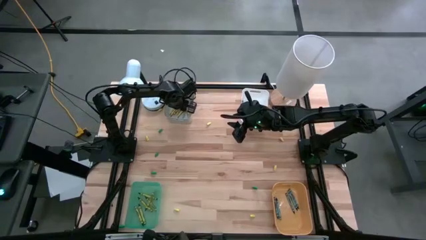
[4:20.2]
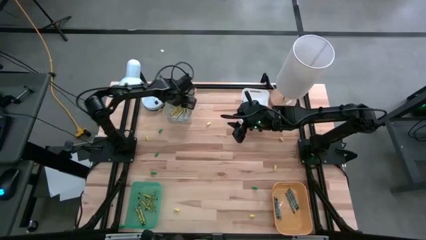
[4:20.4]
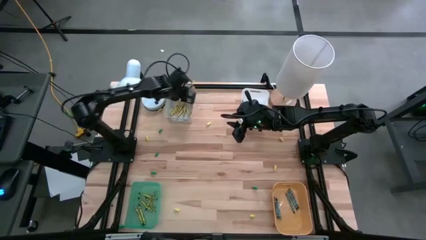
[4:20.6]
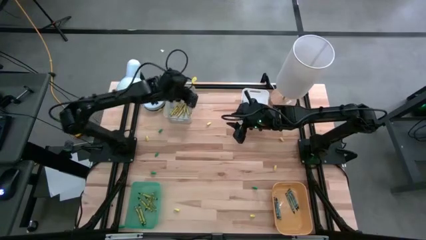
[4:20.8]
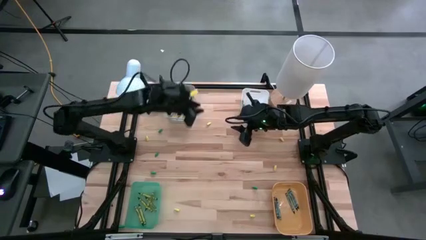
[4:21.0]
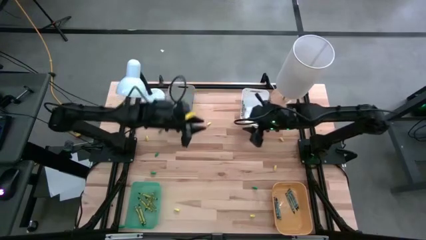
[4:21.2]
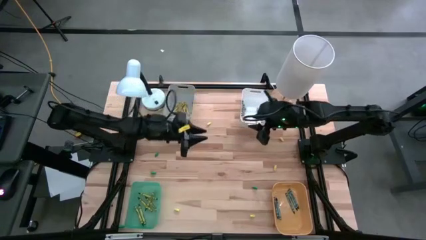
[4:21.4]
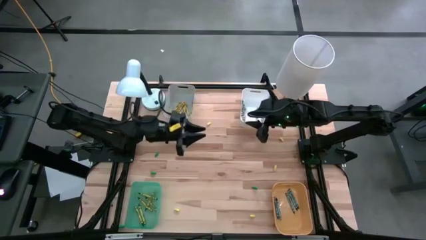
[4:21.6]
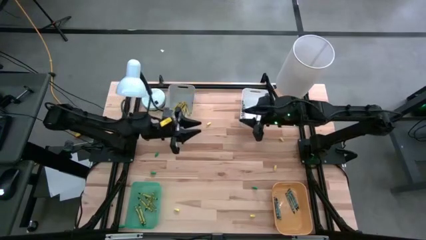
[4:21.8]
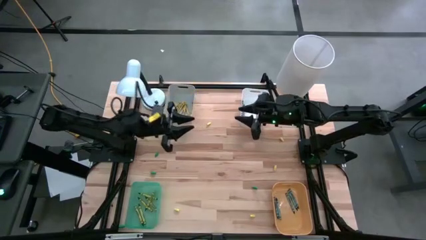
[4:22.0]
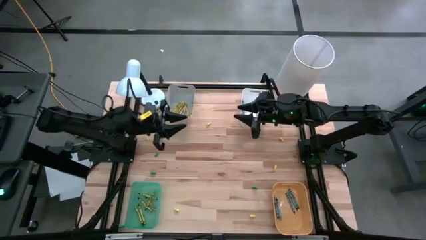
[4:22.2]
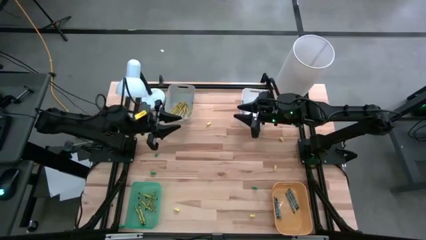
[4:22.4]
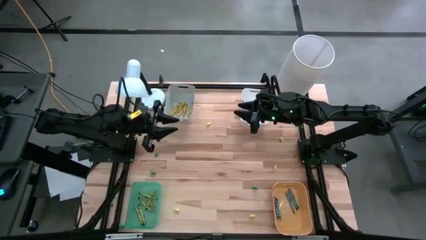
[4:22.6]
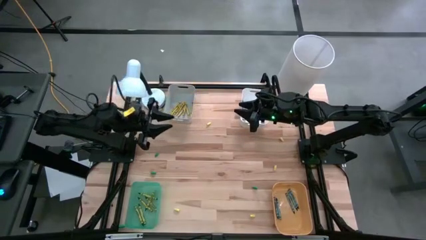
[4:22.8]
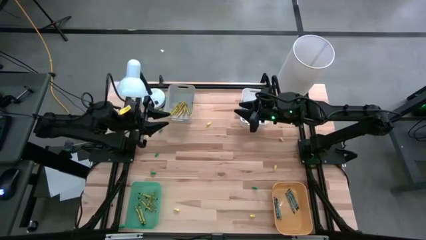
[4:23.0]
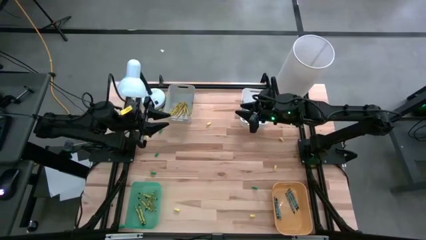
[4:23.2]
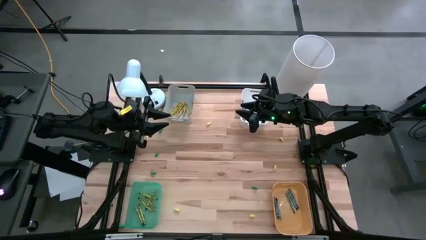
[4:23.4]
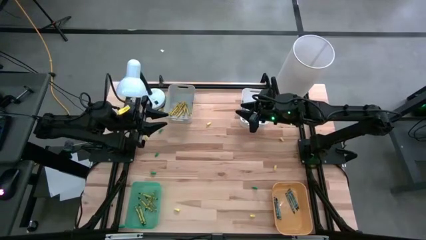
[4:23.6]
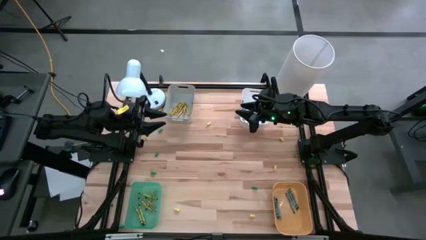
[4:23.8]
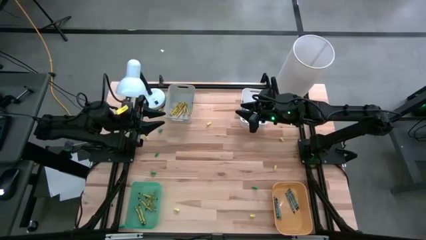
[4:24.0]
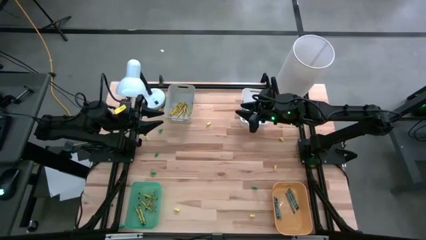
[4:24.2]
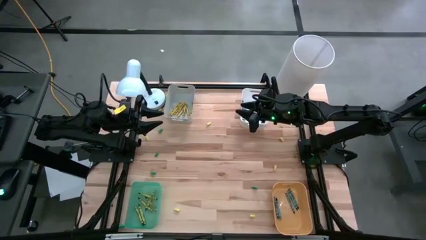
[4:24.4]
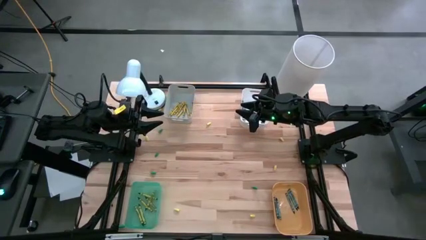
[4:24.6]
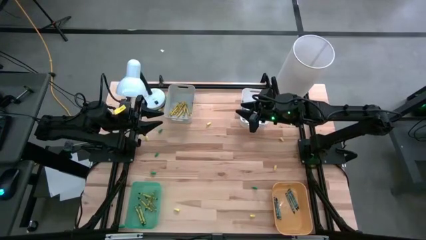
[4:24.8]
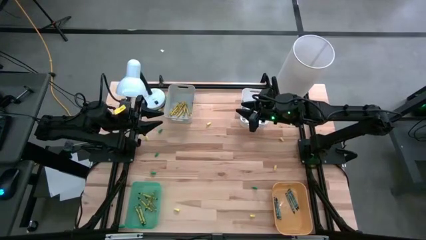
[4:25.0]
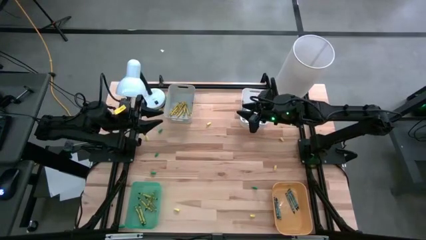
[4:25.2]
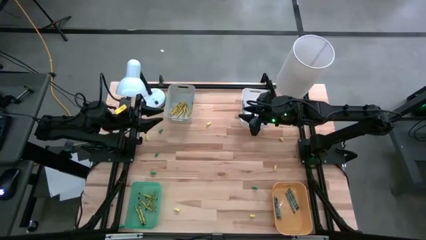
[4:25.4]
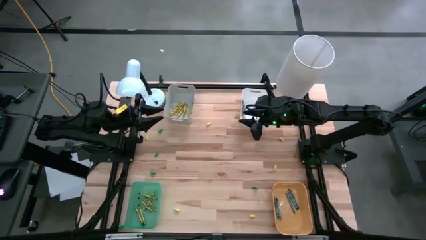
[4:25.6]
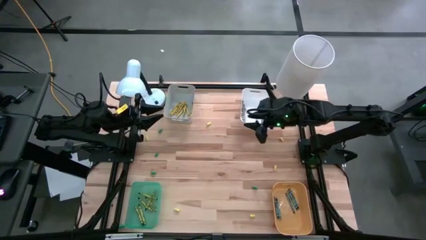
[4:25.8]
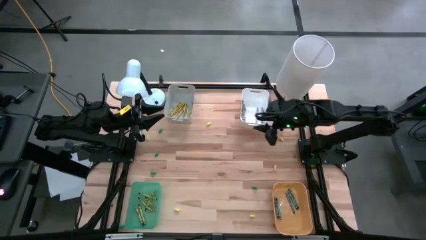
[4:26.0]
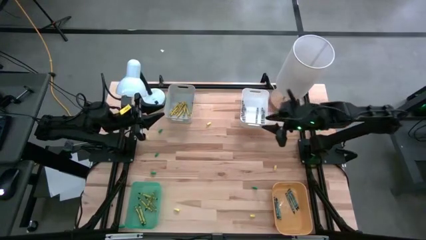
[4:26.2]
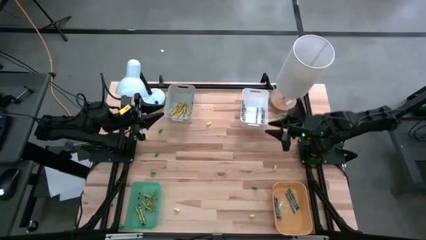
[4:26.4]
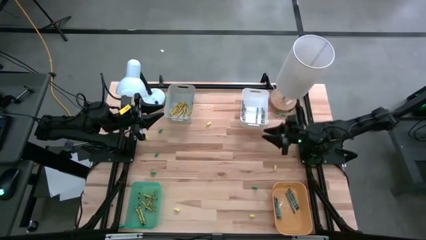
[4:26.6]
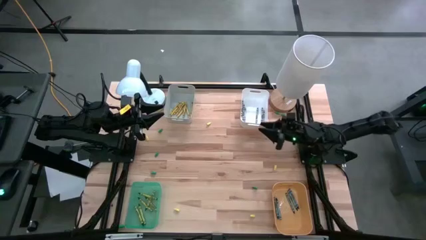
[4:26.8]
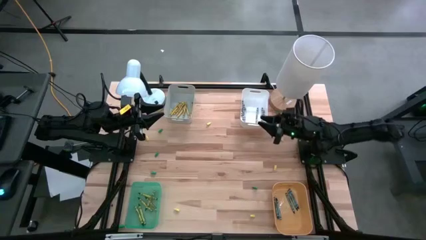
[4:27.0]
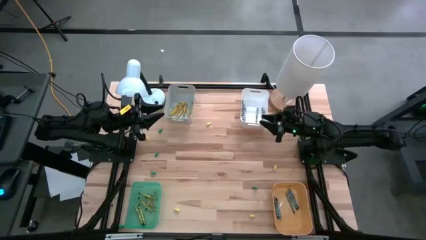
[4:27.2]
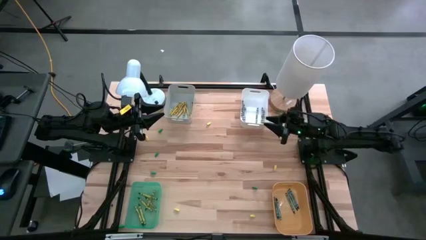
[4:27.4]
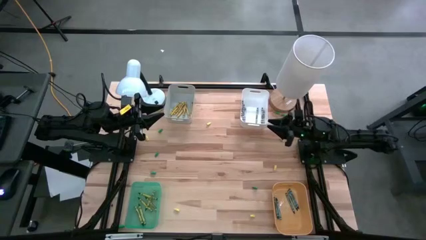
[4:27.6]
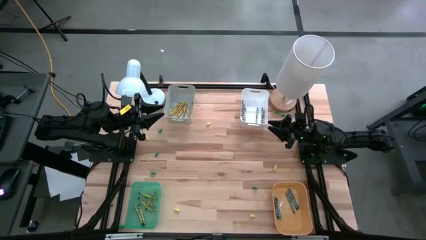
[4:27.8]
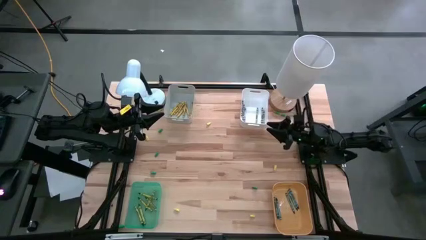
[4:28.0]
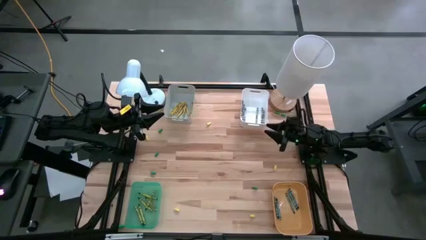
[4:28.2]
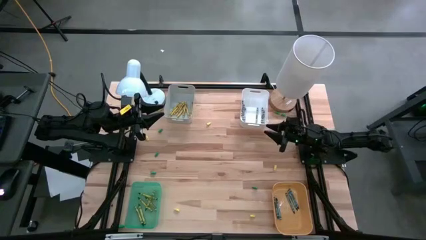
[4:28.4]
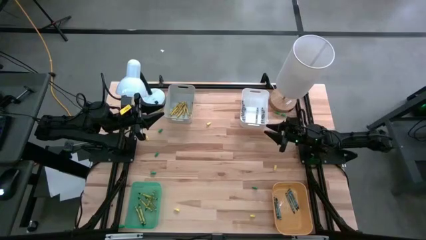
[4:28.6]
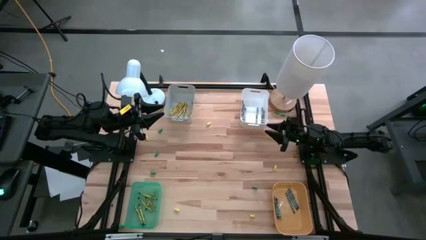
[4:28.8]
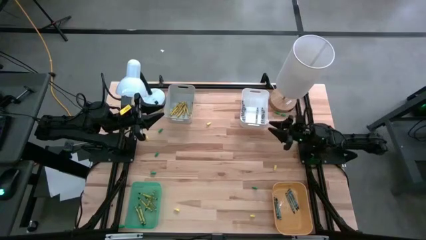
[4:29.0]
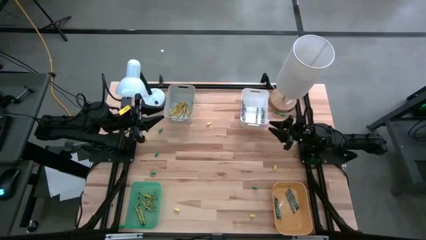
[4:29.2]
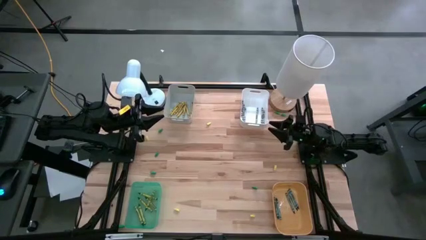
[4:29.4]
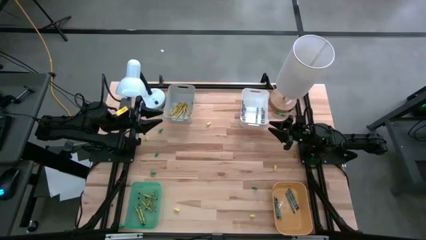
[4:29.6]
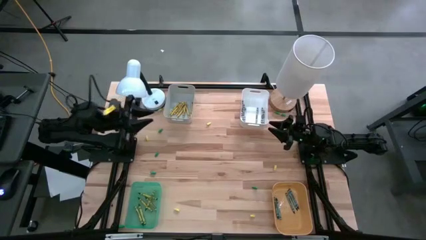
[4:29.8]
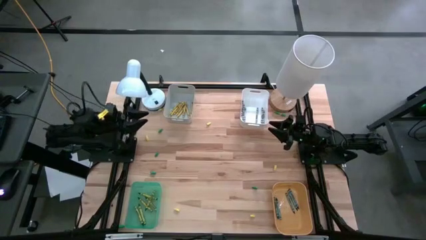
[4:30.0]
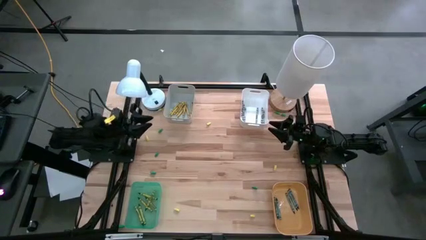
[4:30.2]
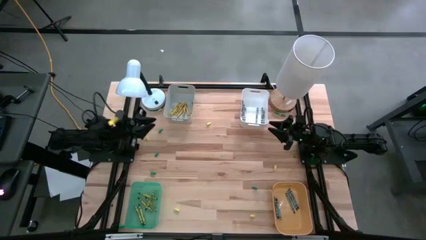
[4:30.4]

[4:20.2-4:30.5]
Task: Sort crayons
Return to Home Position
